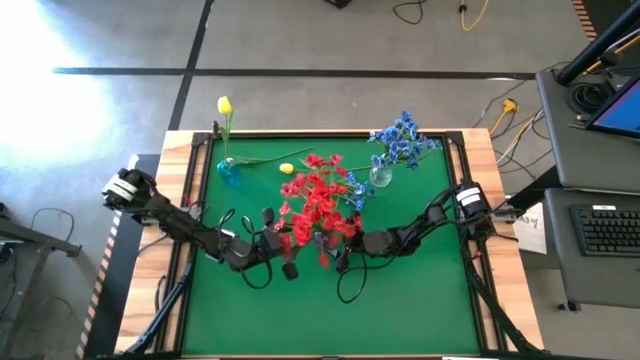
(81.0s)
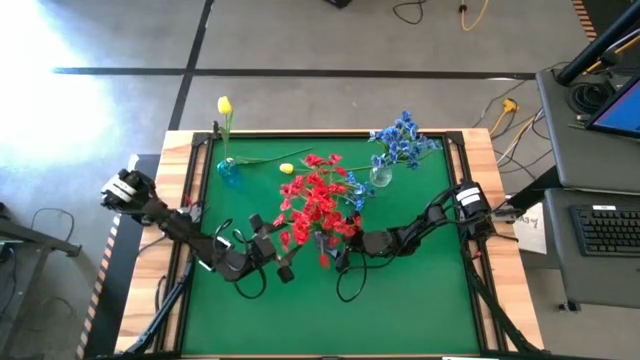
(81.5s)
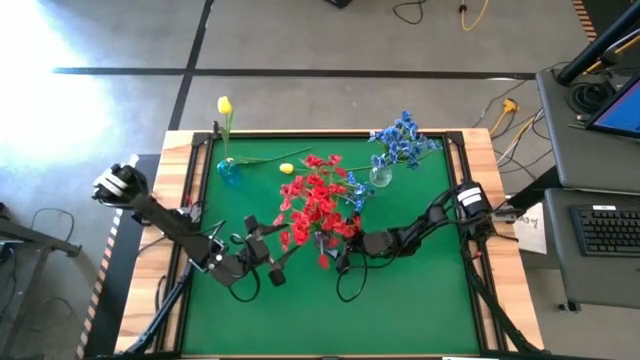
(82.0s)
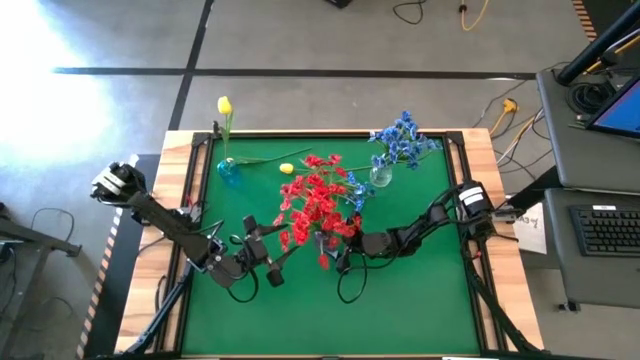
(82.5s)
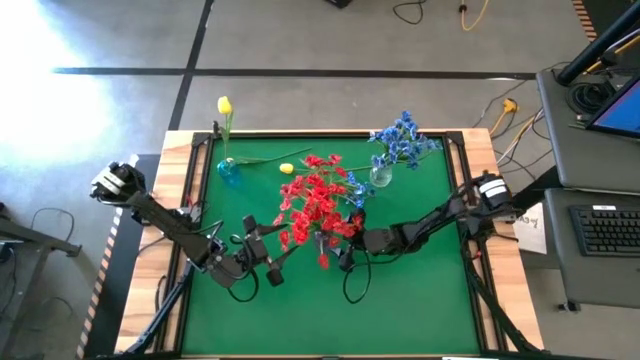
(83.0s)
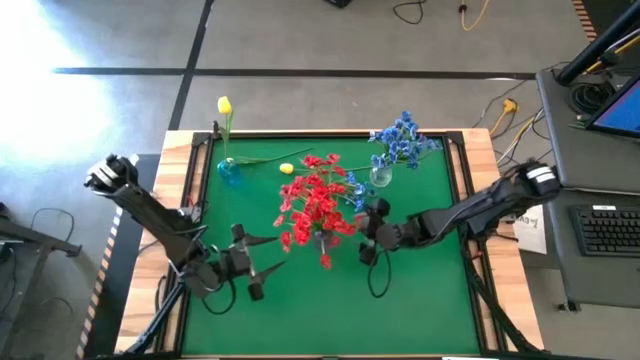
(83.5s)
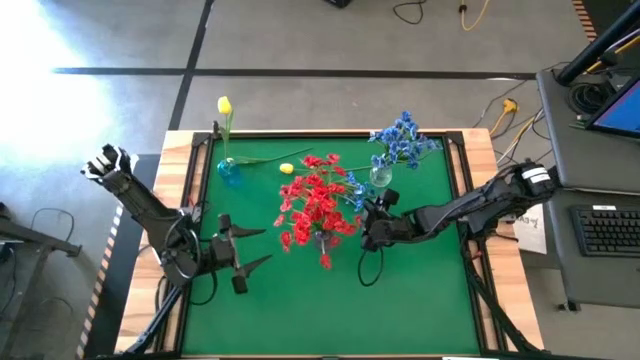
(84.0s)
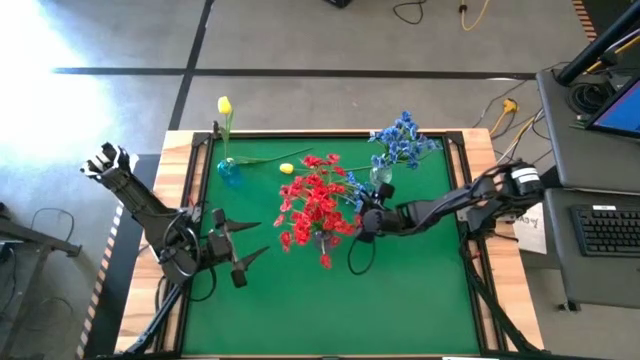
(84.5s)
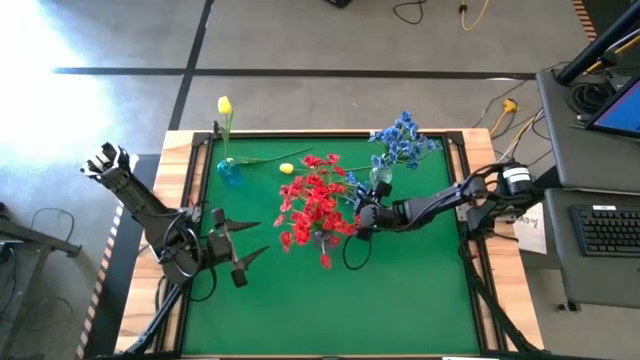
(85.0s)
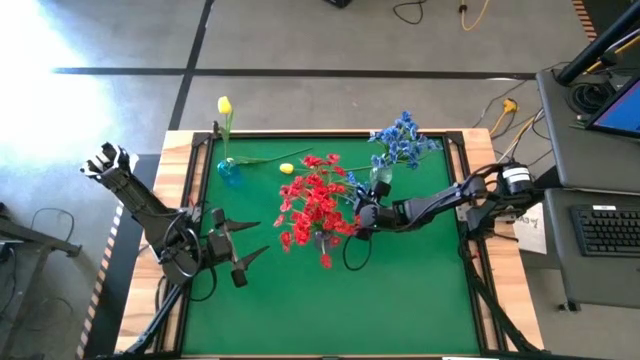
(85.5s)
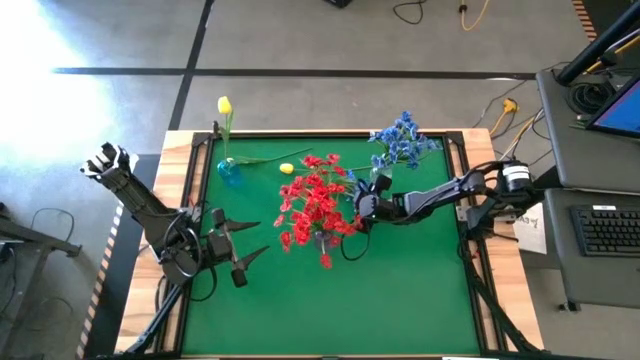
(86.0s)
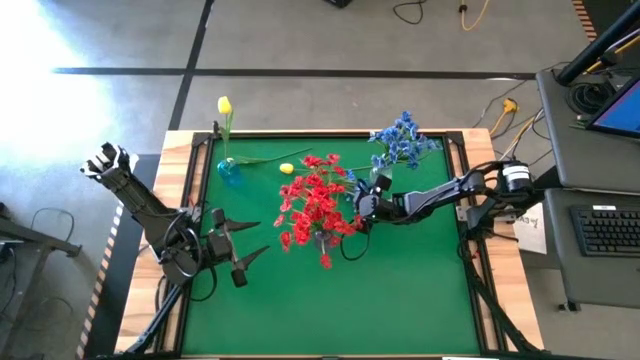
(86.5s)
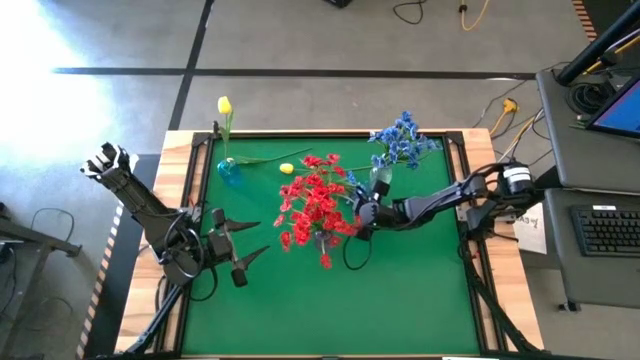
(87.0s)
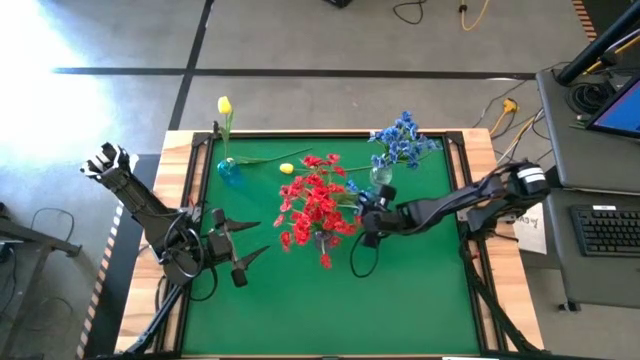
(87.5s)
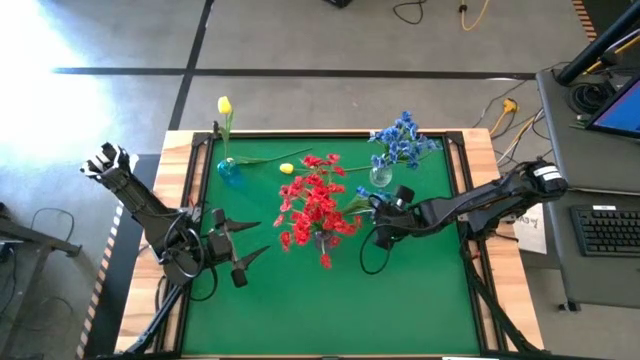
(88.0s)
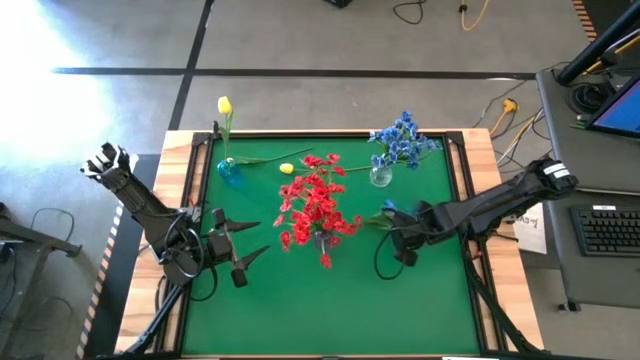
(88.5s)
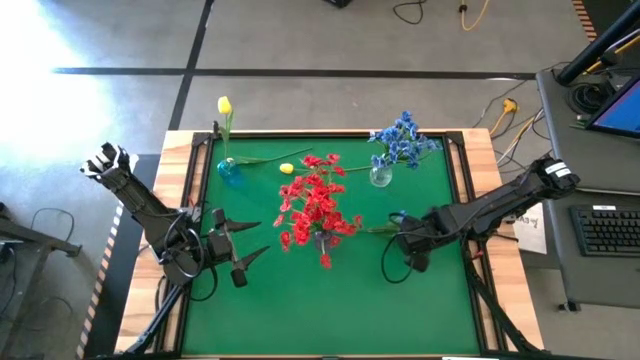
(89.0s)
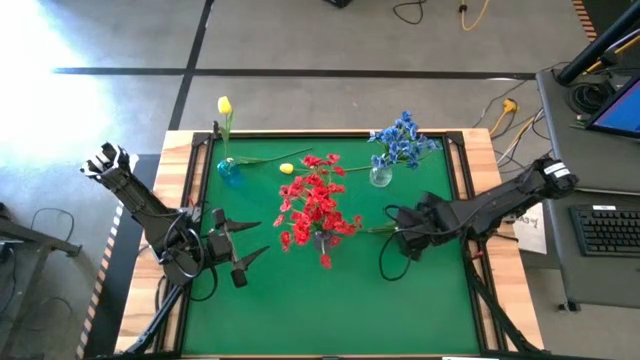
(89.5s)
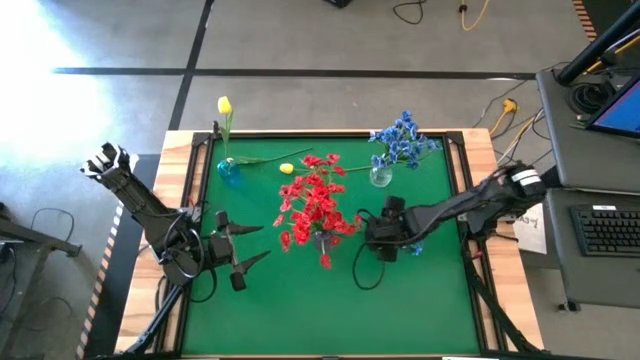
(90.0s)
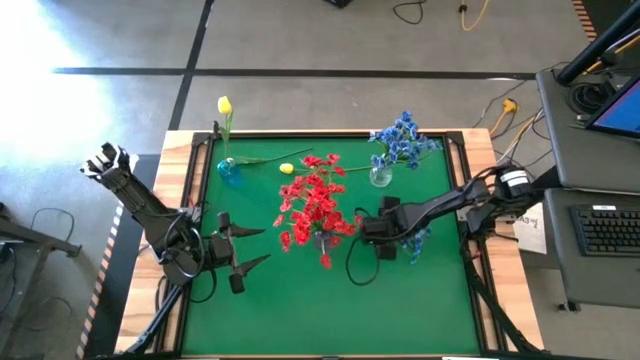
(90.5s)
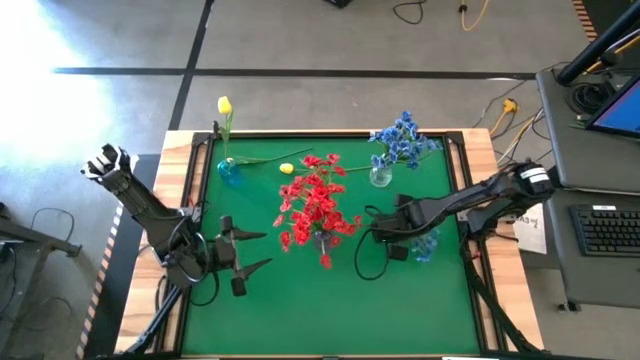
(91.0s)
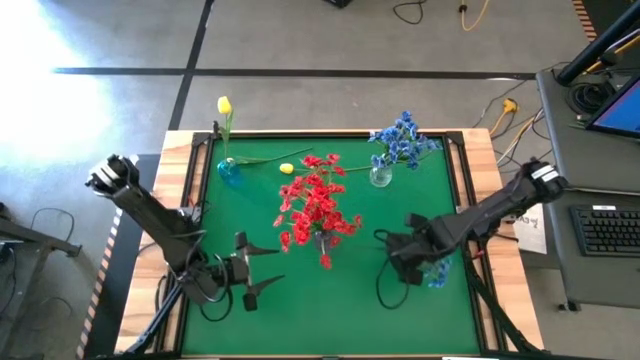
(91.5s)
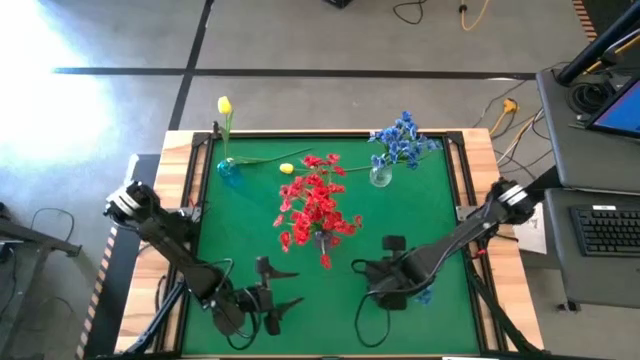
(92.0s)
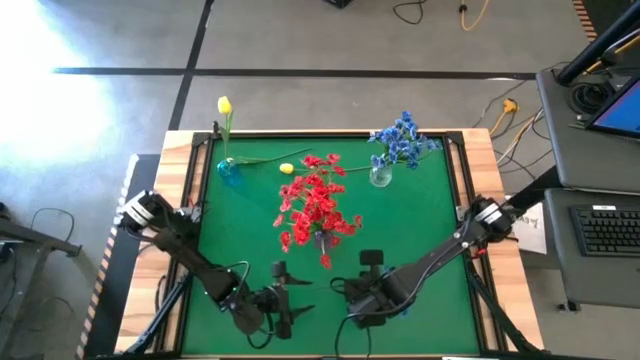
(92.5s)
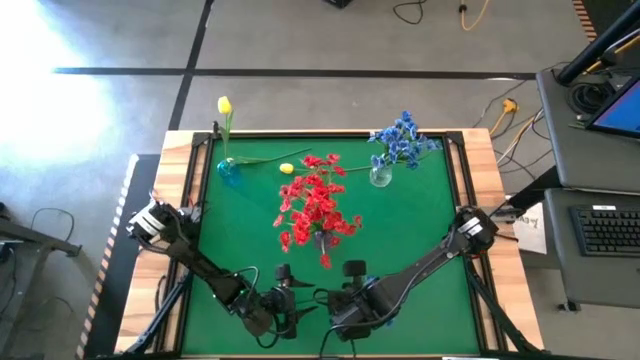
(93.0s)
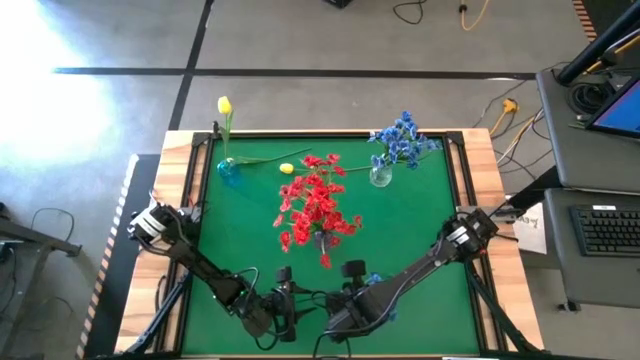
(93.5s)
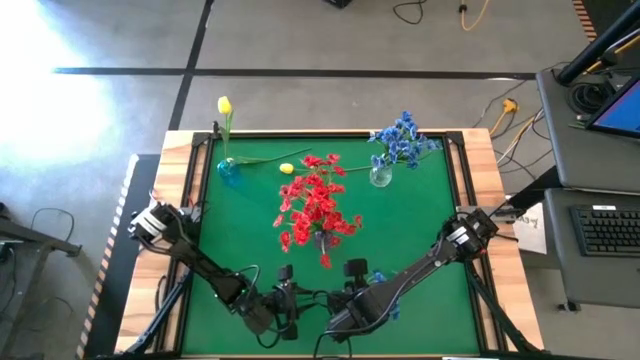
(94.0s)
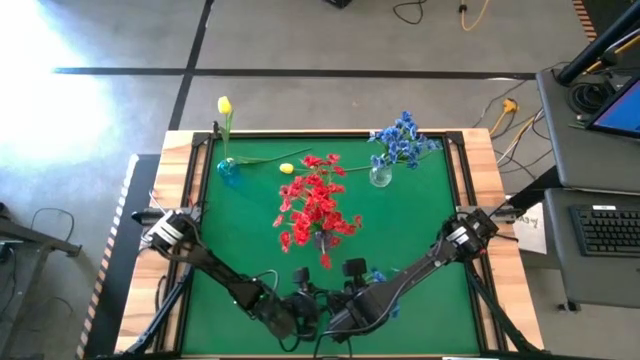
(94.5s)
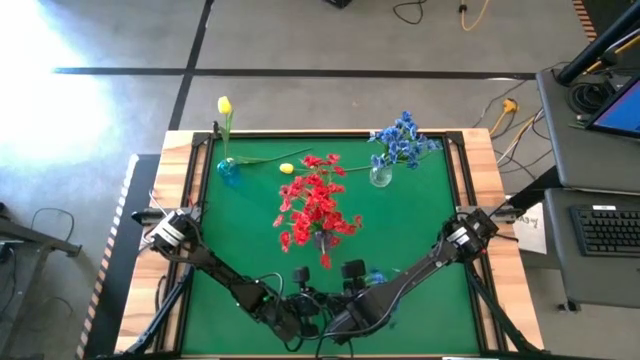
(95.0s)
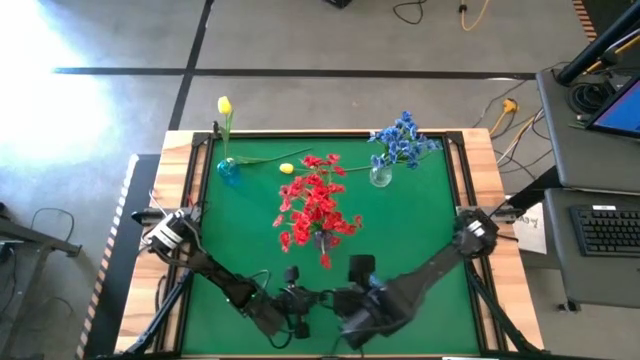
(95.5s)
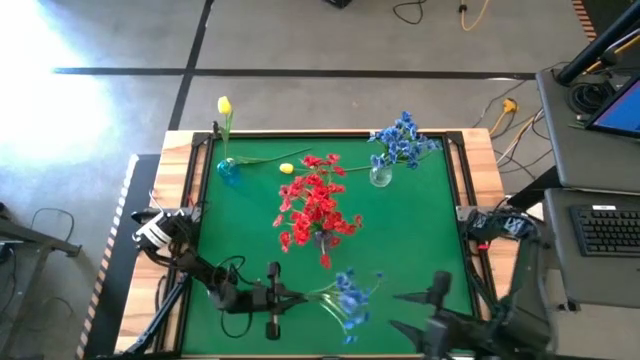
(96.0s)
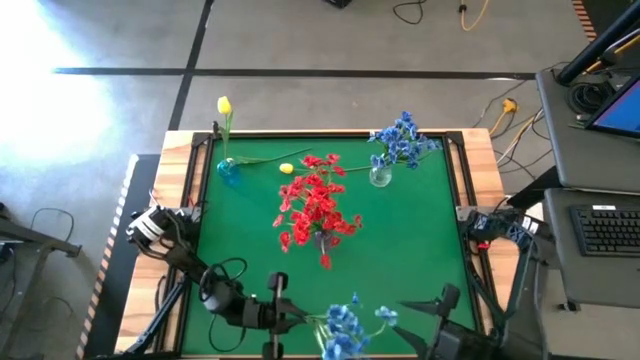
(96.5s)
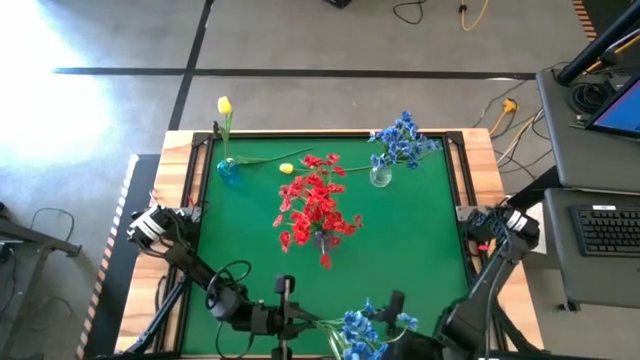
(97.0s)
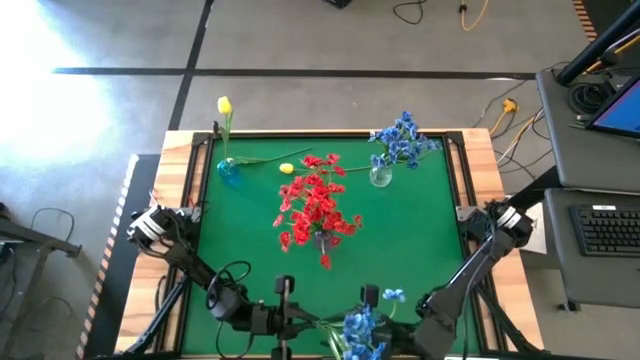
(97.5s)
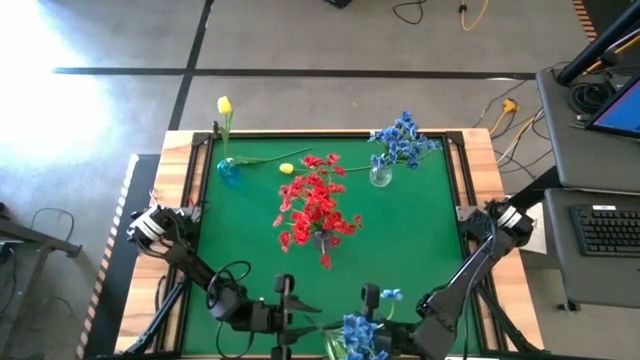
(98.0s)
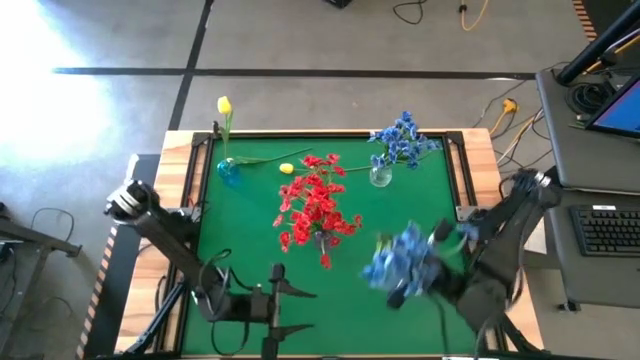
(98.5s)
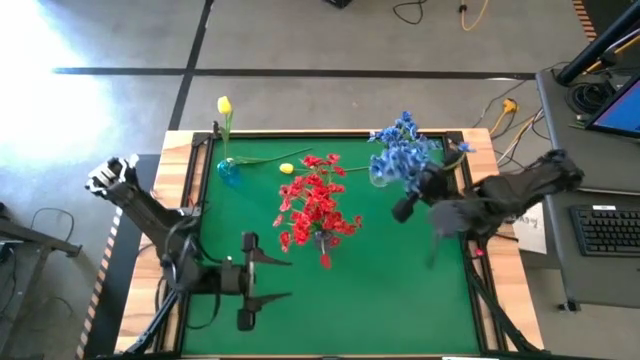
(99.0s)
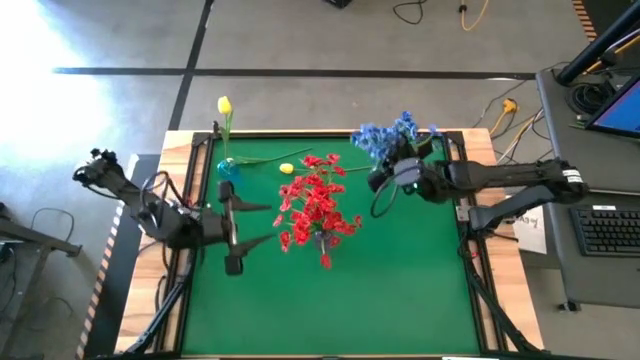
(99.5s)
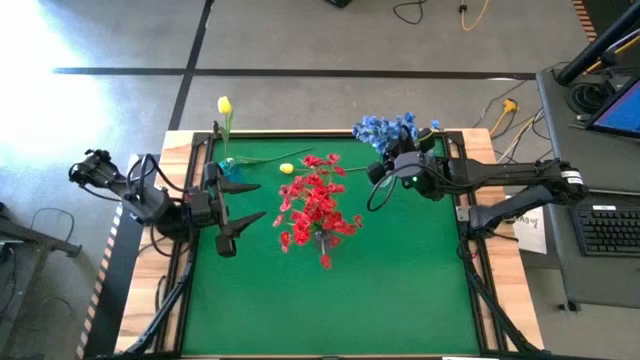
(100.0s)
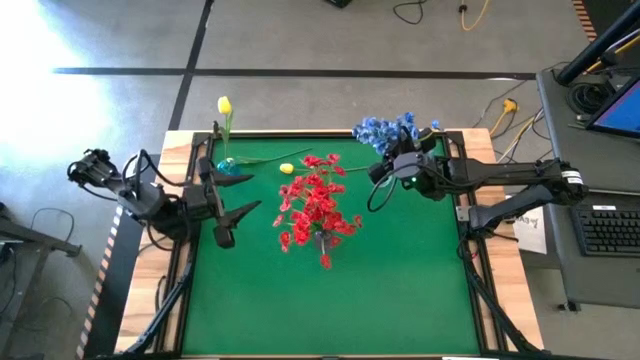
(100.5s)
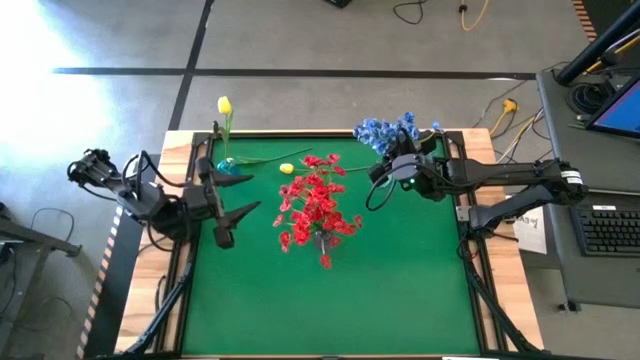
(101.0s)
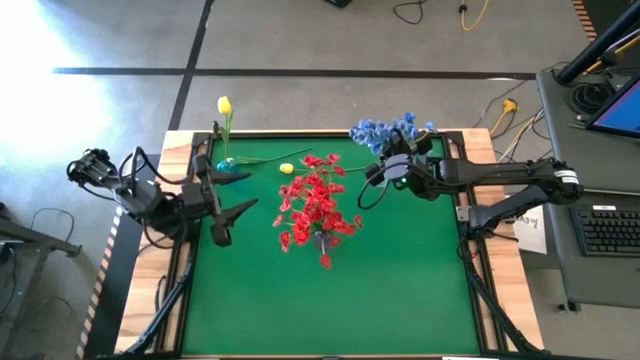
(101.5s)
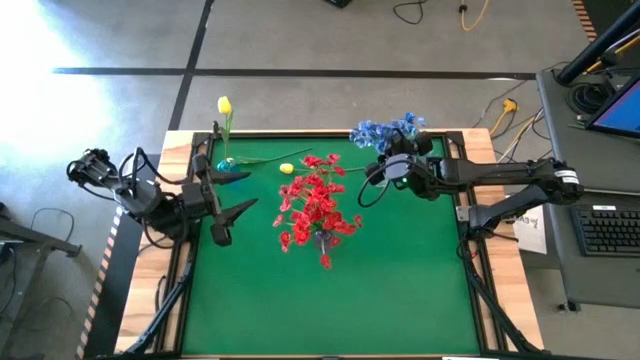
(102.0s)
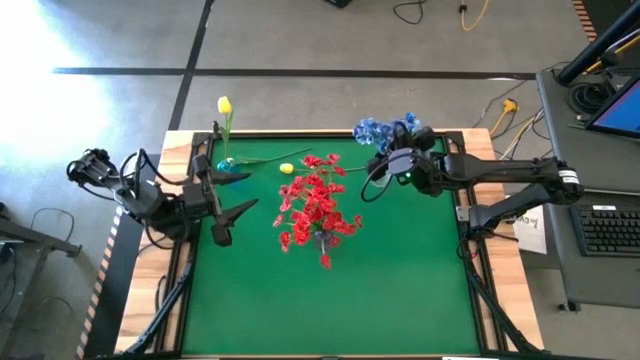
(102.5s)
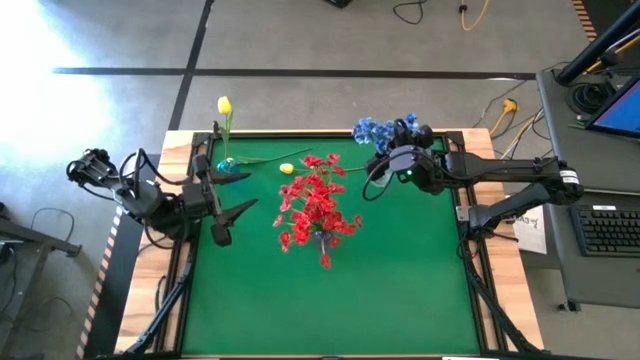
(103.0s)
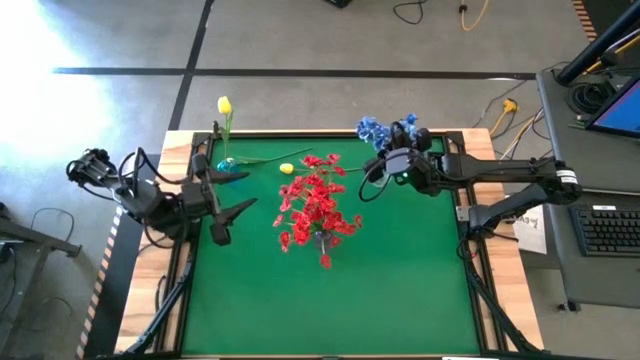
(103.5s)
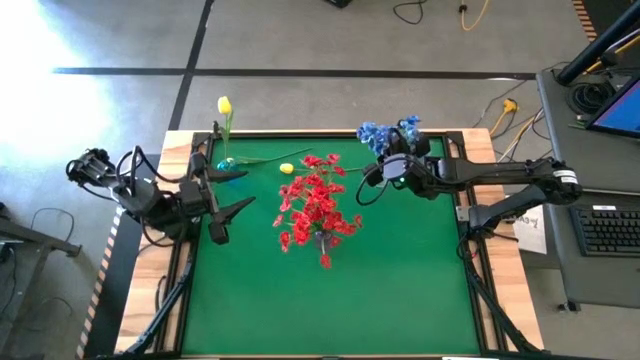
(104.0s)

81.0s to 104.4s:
Task: Sort flowers into vase by color
Put the blue flowers into the transparent vase
